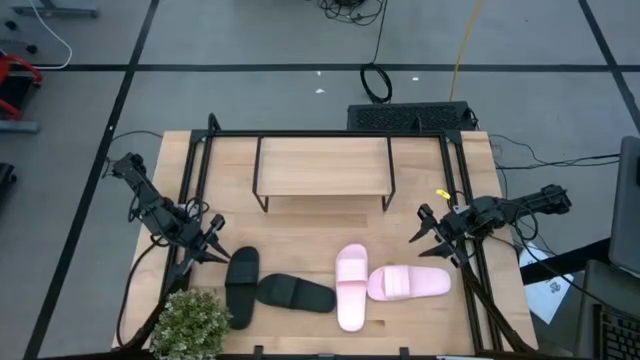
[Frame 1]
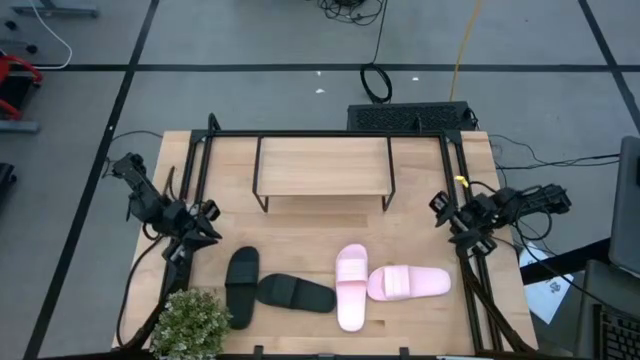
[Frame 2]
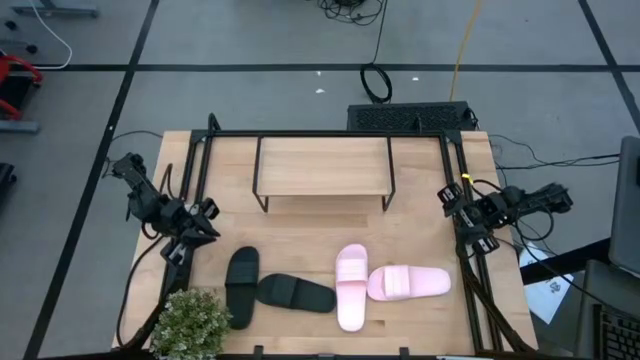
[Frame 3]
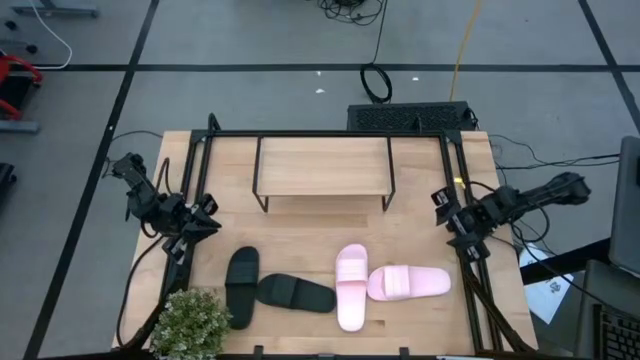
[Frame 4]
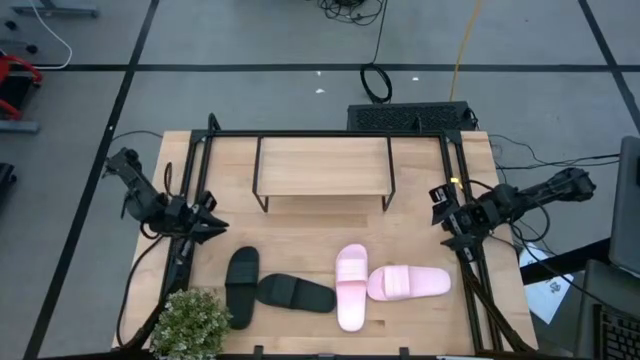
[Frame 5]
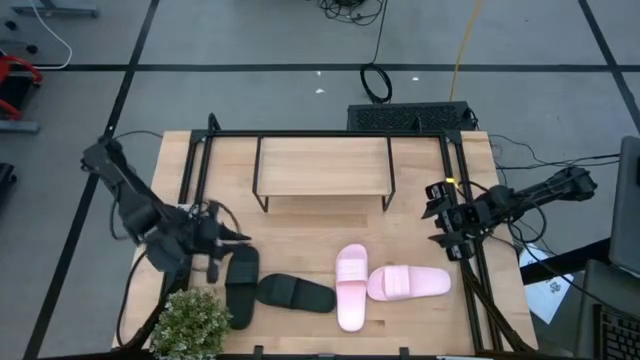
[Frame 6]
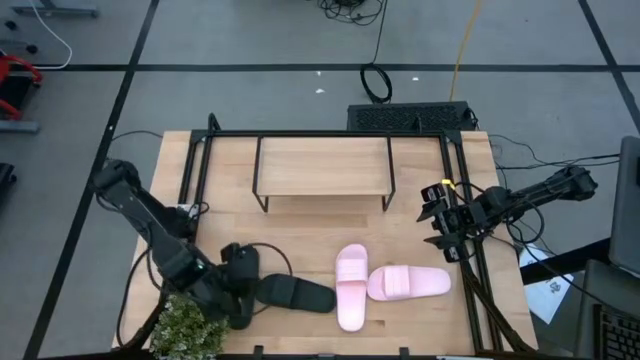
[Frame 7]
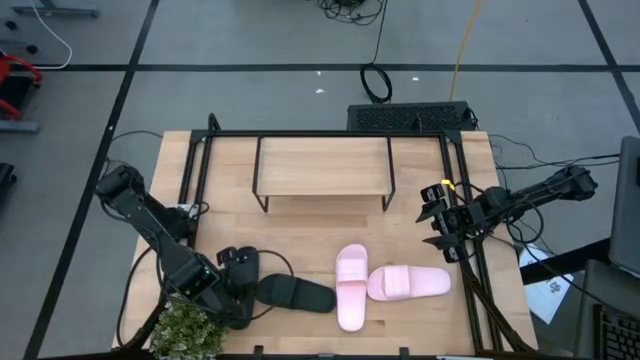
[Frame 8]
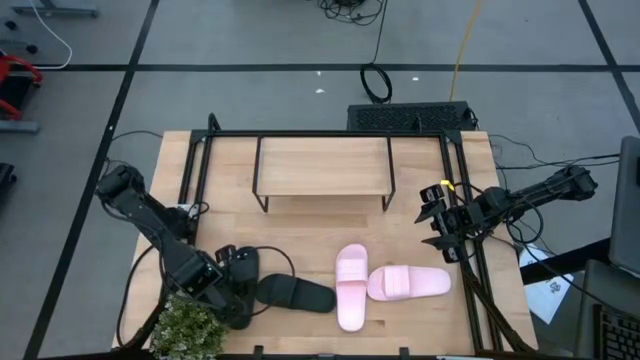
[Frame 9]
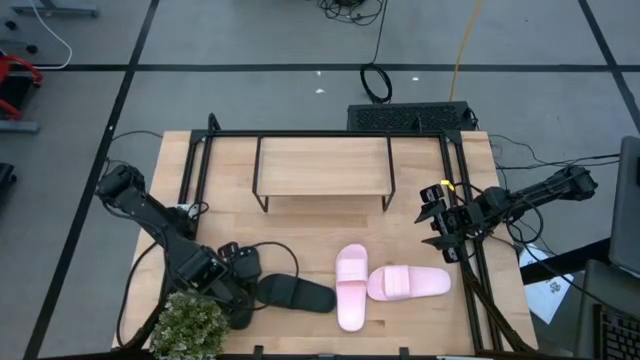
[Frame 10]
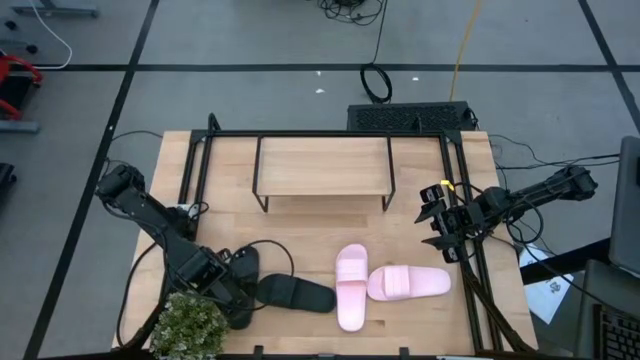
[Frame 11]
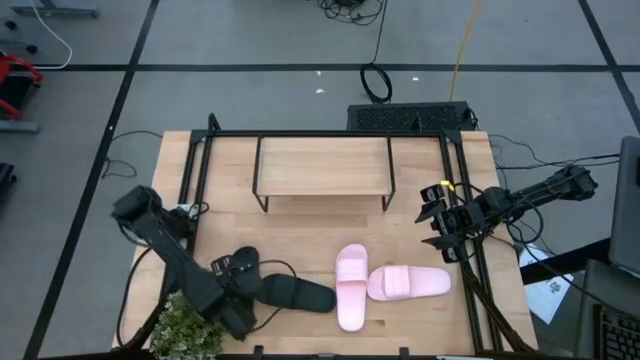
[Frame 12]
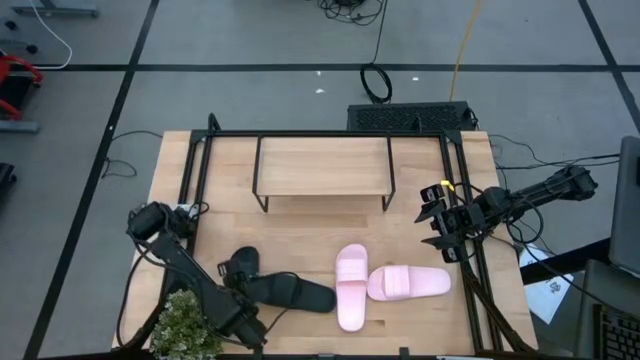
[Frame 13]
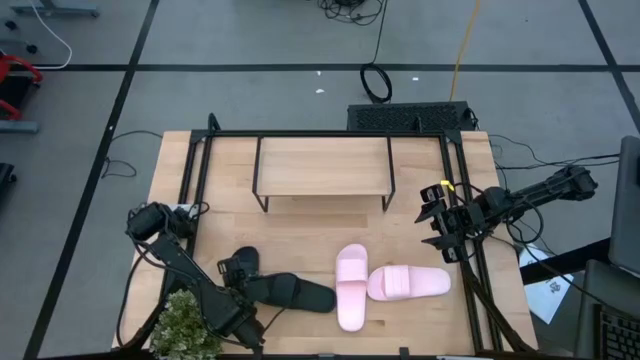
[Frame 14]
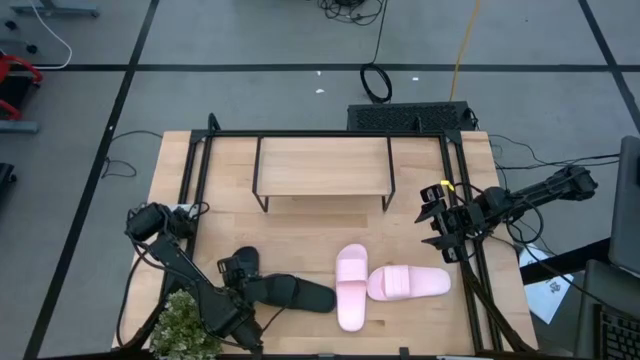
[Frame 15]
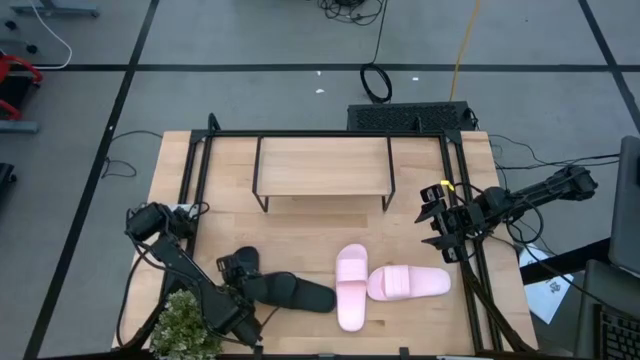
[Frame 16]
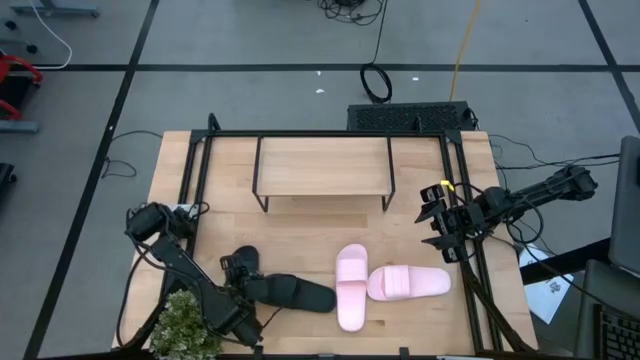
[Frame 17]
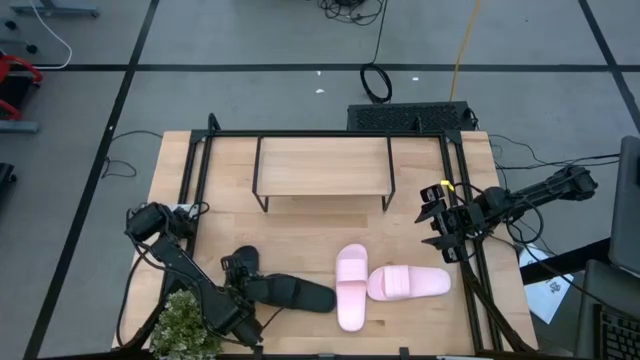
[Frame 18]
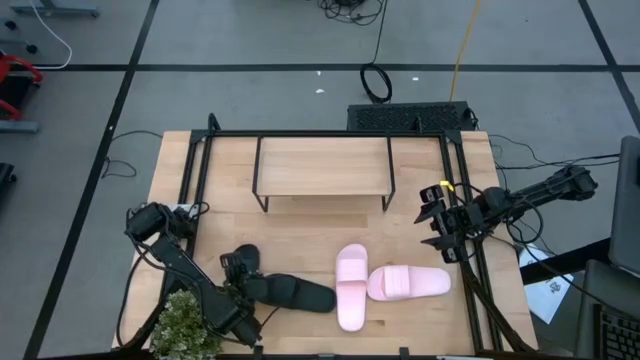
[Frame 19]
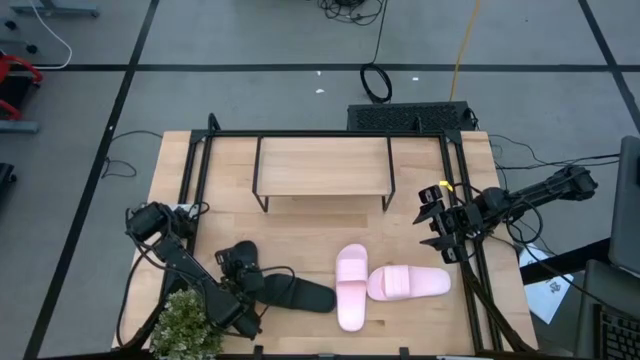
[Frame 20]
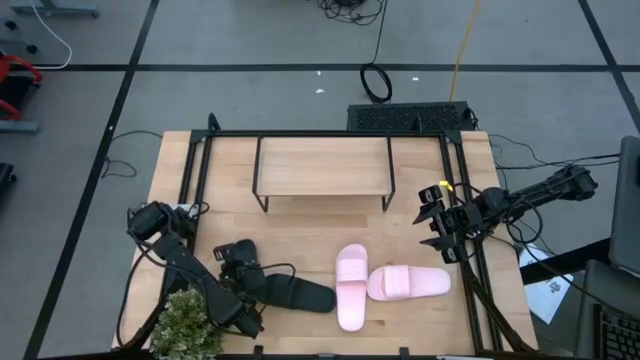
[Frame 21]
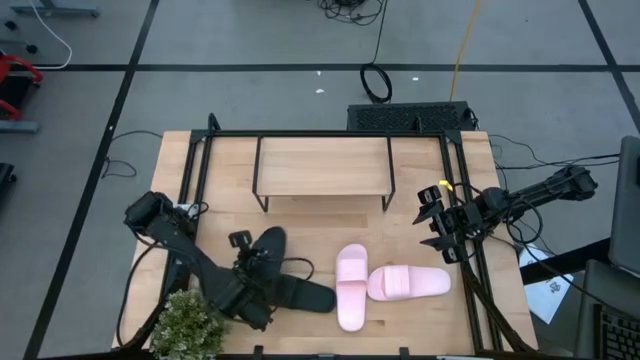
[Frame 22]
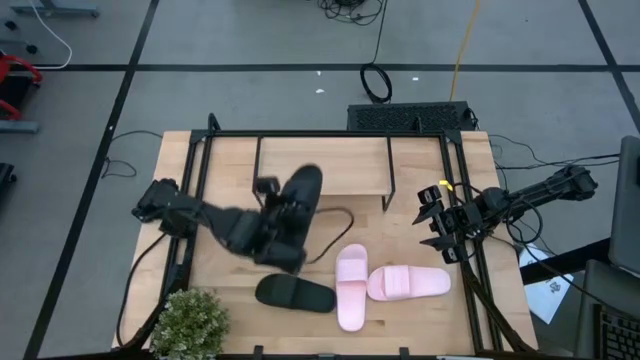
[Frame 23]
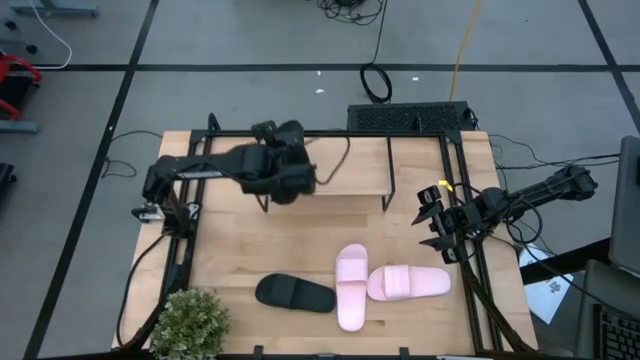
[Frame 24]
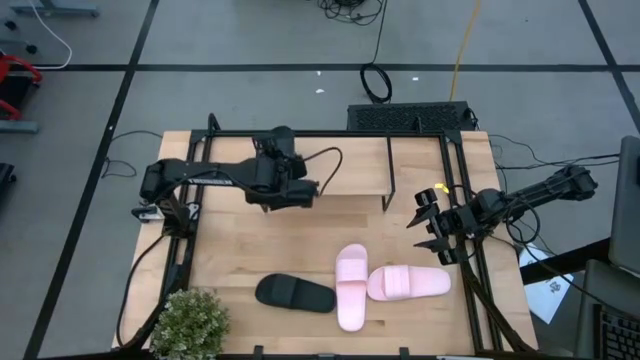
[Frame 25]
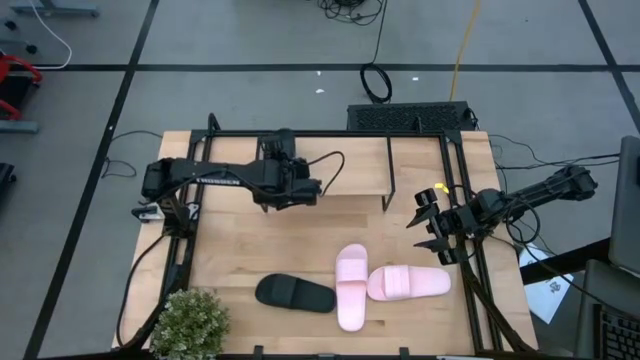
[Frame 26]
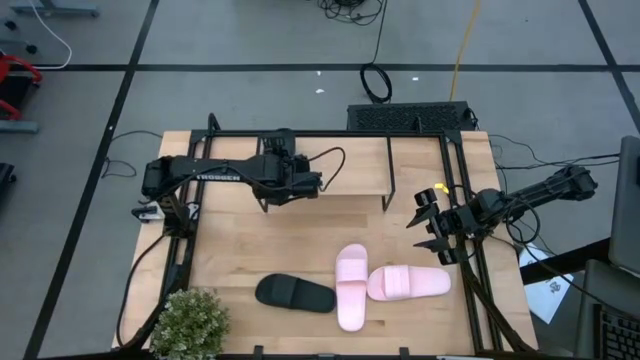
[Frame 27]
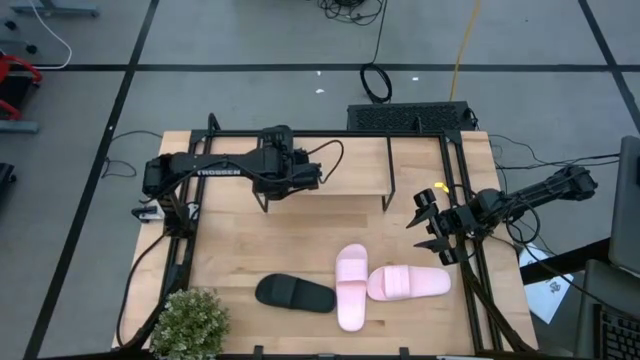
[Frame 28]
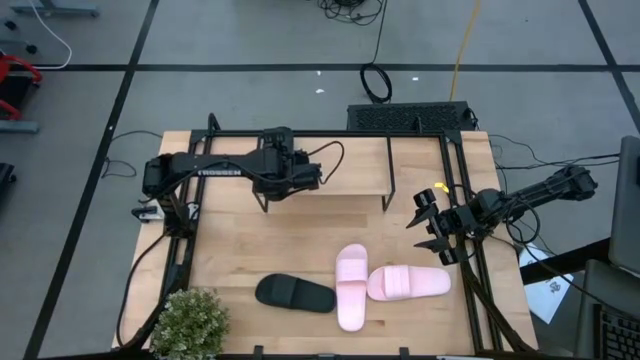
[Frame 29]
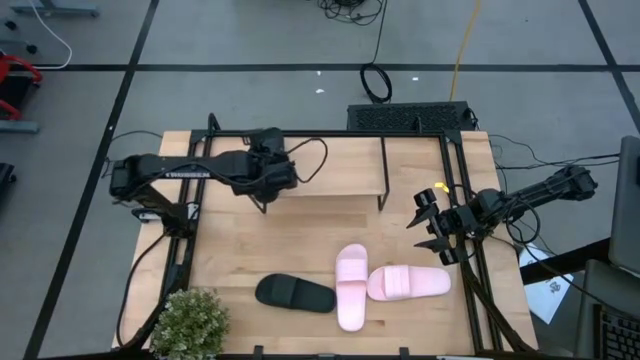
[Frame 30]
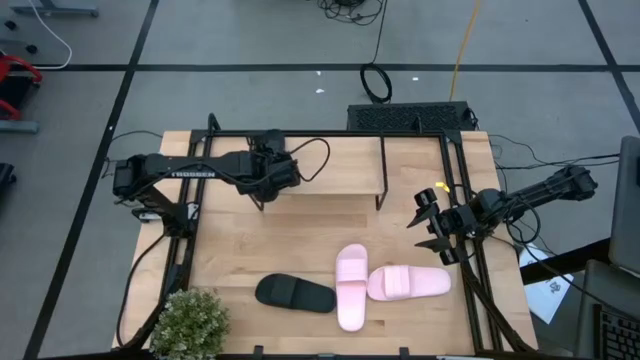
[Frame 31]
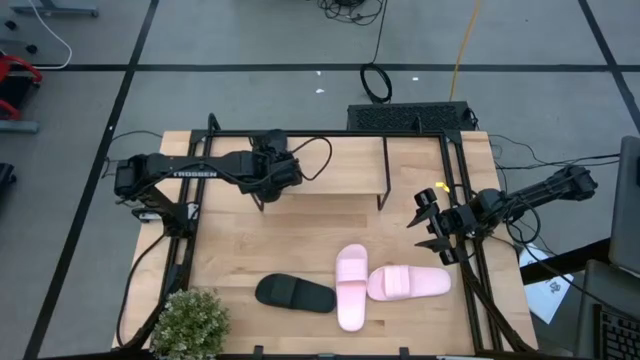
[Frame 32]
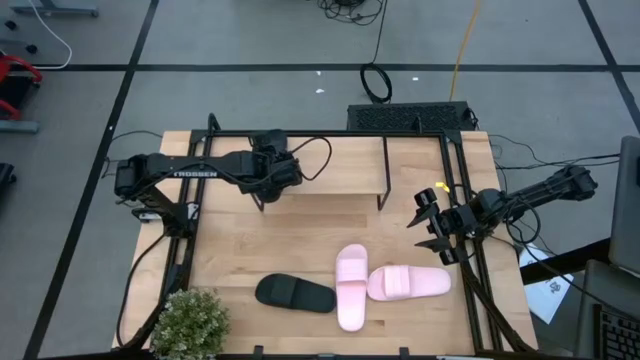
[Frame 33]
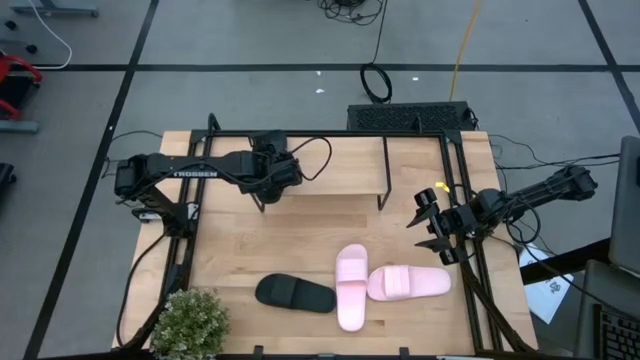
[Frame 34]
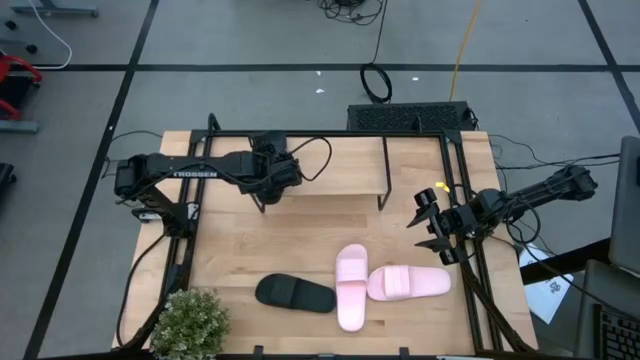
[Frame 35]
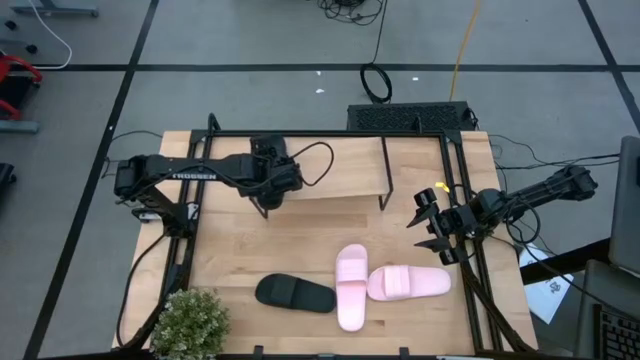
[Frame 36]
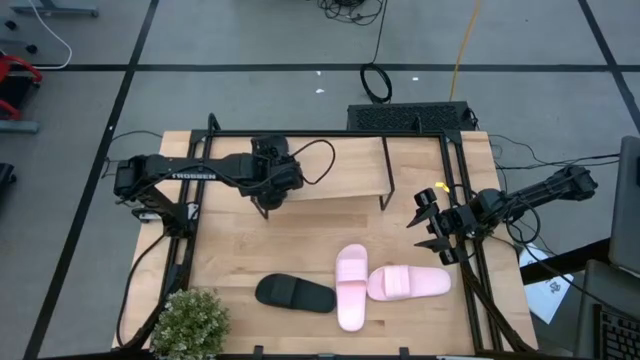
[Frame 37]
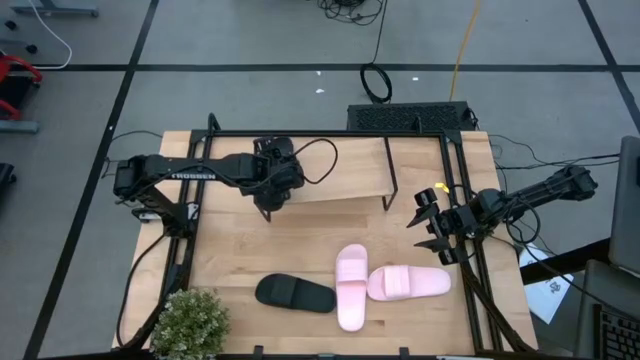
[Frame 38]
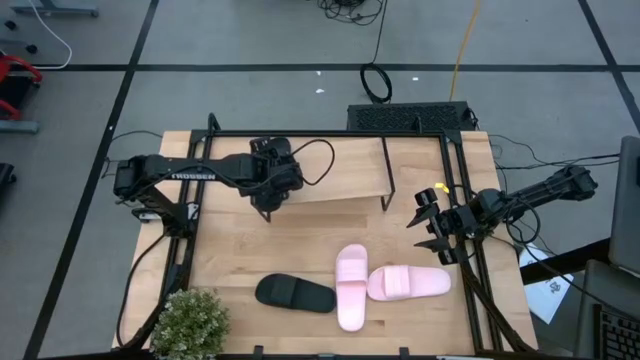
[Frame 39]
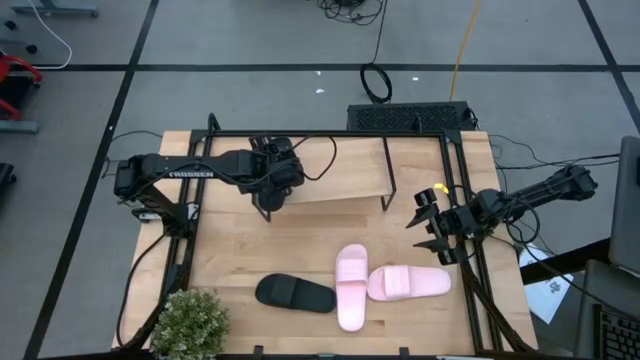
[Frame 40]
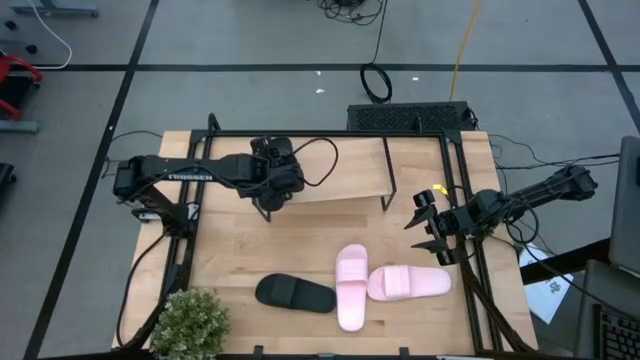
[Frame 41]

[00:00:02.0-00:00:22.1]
Task: Pick and place slides into the shelf
Put the left black slide on the shelf
